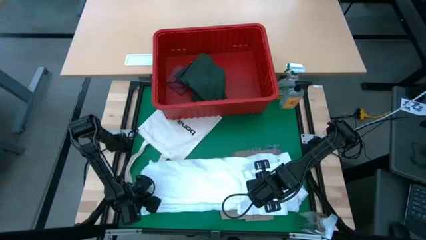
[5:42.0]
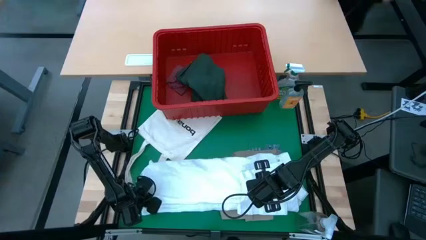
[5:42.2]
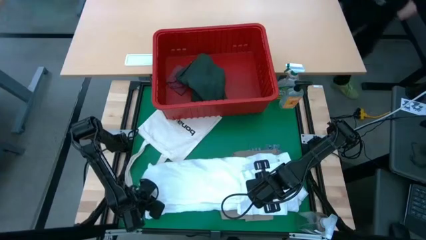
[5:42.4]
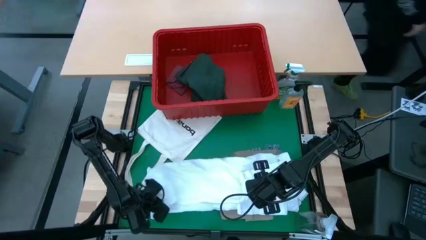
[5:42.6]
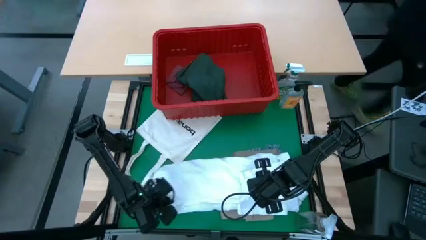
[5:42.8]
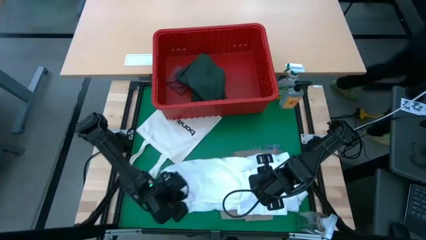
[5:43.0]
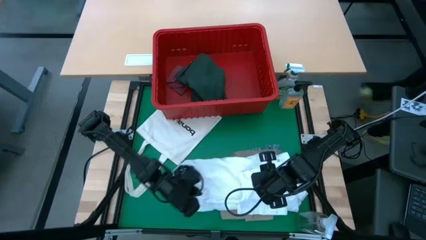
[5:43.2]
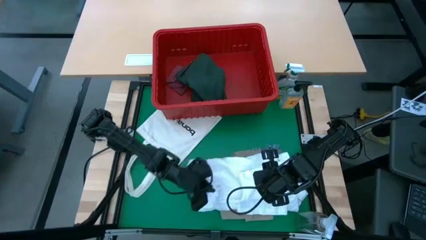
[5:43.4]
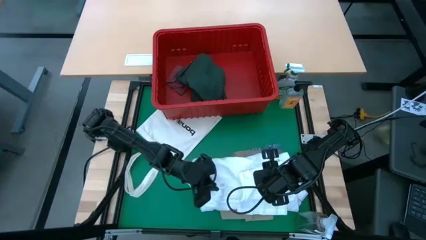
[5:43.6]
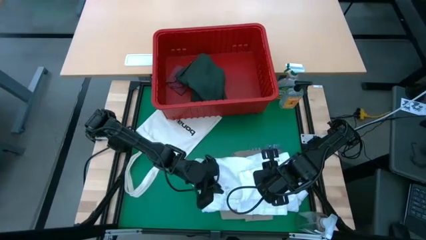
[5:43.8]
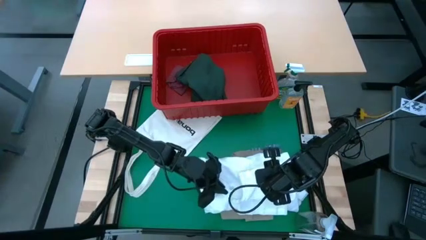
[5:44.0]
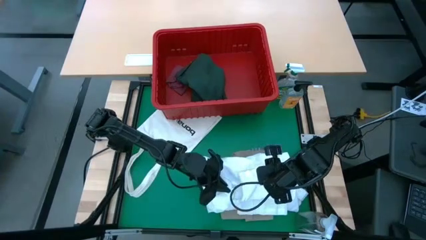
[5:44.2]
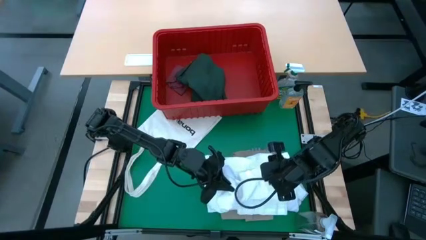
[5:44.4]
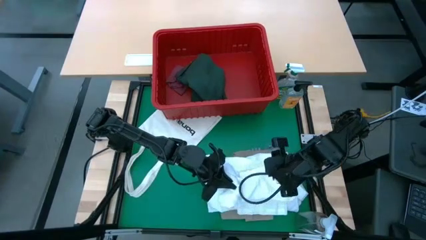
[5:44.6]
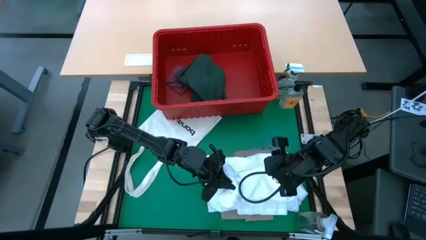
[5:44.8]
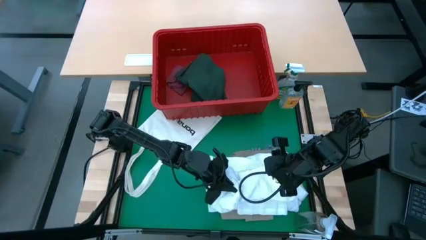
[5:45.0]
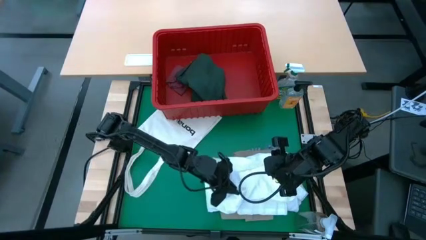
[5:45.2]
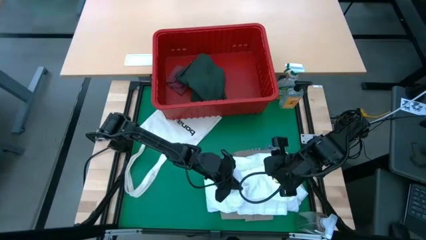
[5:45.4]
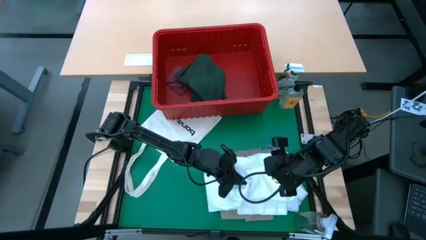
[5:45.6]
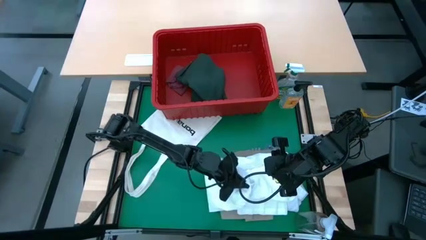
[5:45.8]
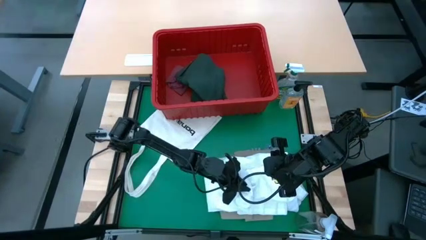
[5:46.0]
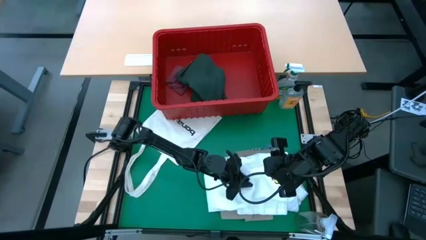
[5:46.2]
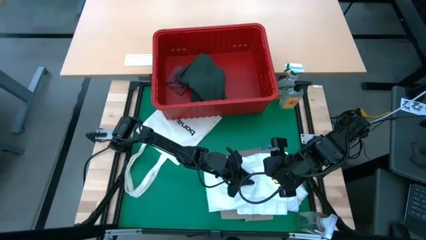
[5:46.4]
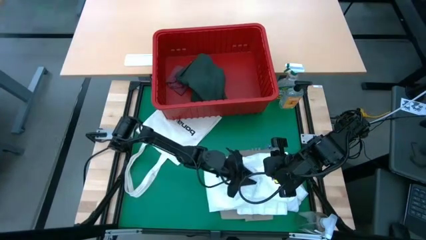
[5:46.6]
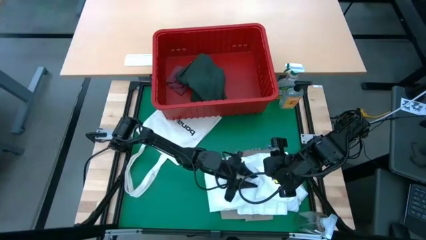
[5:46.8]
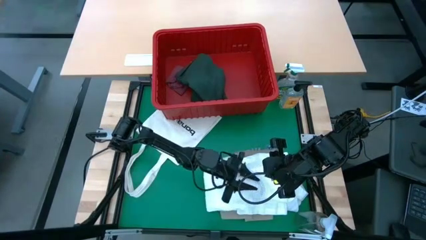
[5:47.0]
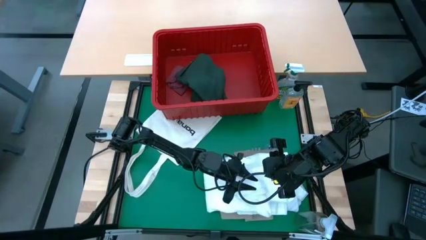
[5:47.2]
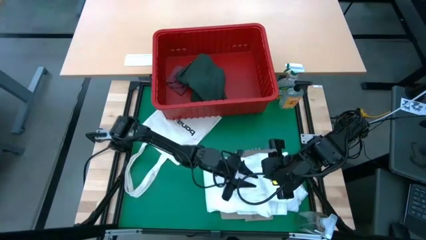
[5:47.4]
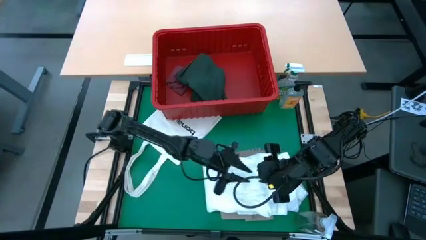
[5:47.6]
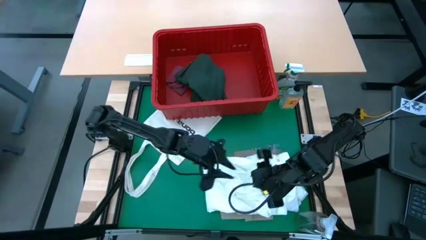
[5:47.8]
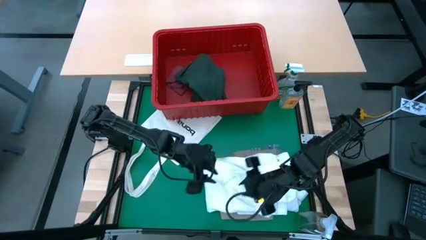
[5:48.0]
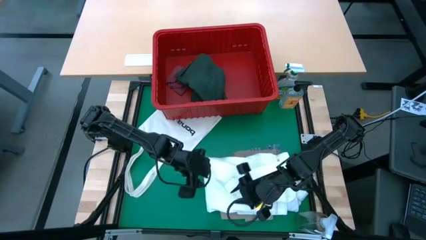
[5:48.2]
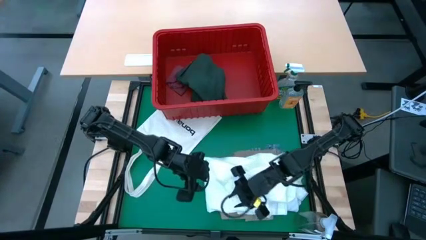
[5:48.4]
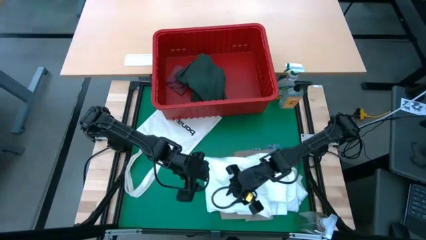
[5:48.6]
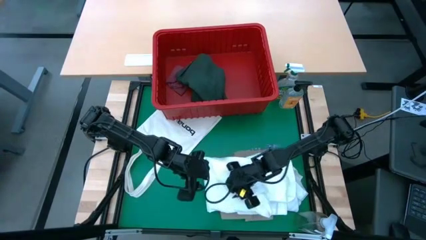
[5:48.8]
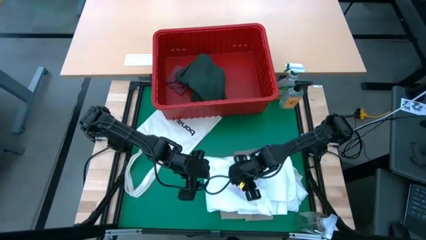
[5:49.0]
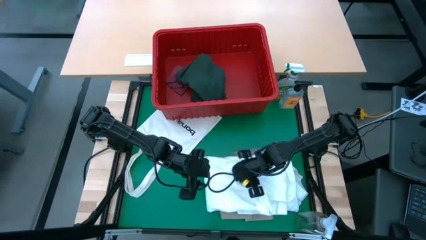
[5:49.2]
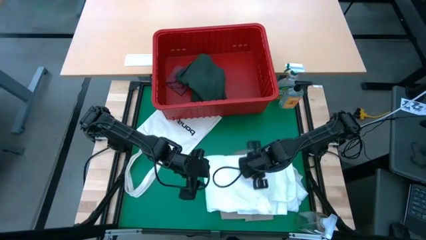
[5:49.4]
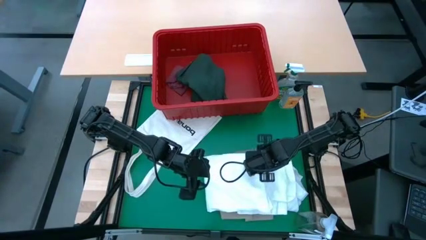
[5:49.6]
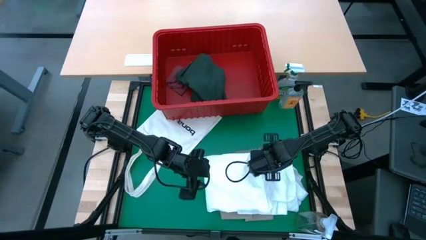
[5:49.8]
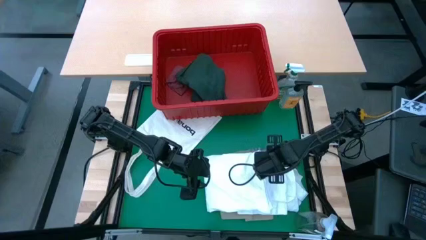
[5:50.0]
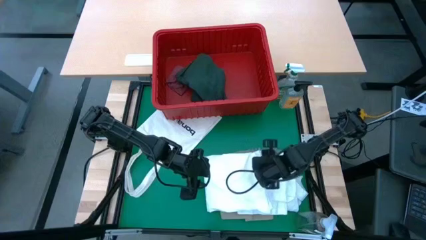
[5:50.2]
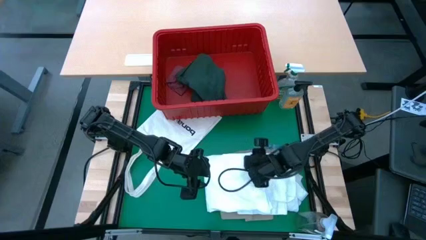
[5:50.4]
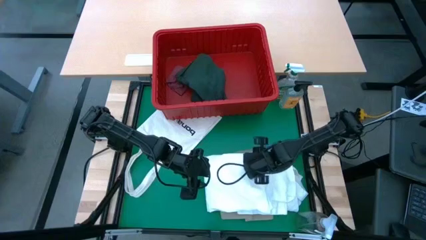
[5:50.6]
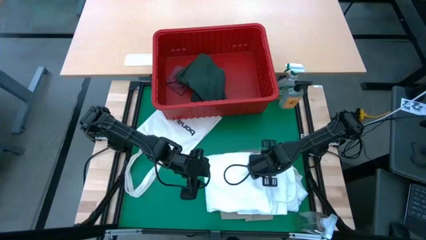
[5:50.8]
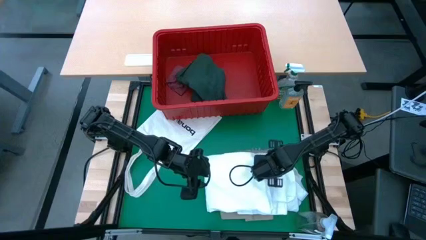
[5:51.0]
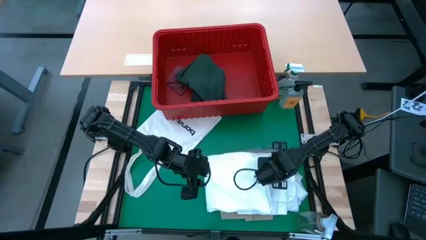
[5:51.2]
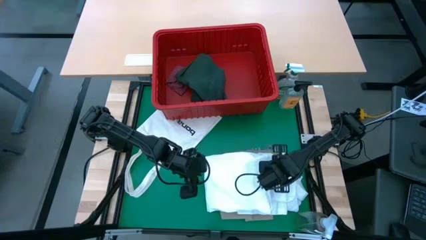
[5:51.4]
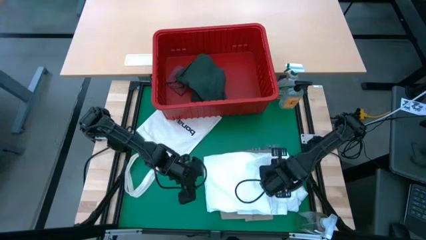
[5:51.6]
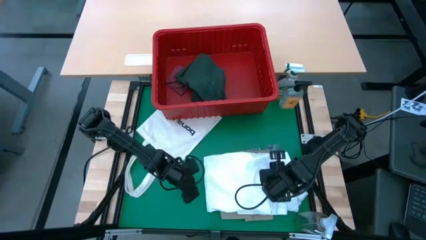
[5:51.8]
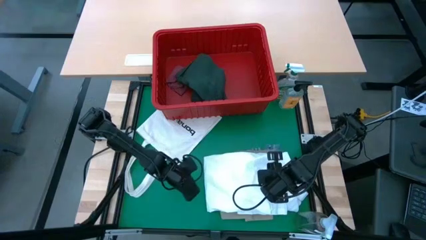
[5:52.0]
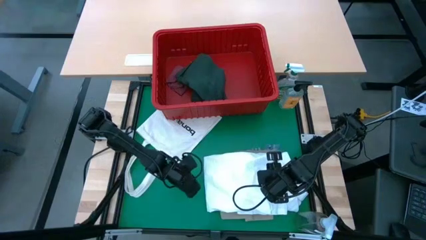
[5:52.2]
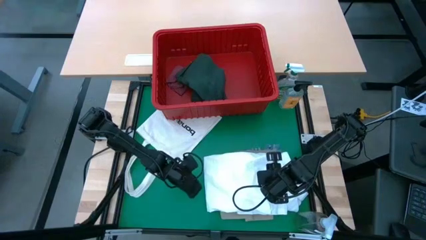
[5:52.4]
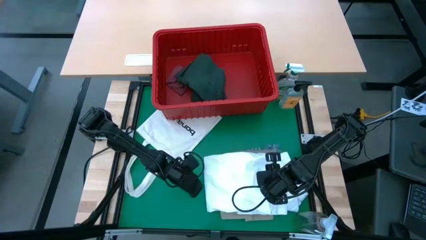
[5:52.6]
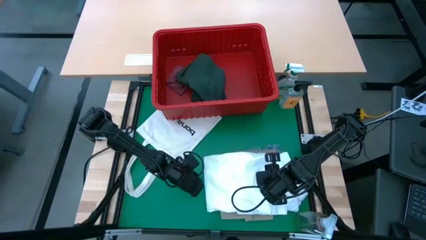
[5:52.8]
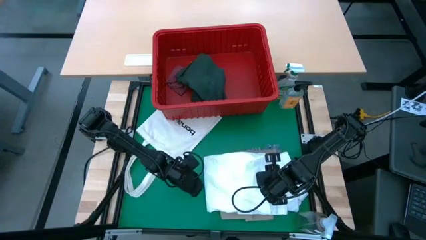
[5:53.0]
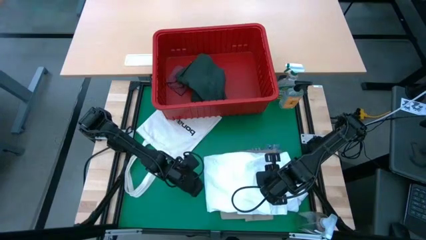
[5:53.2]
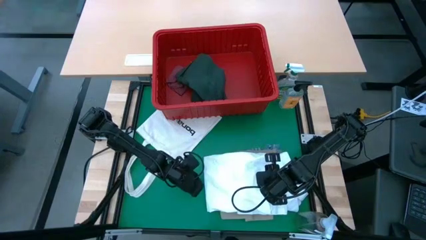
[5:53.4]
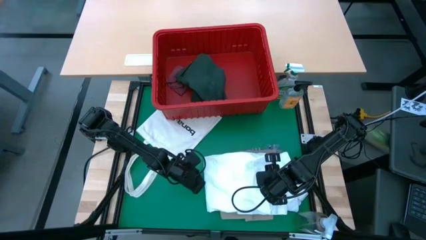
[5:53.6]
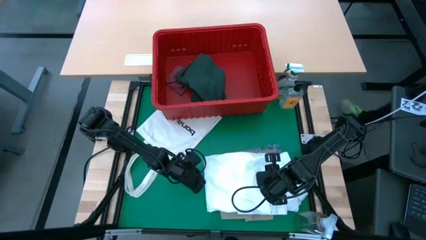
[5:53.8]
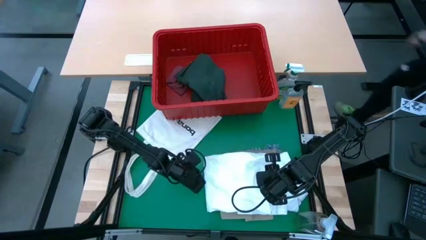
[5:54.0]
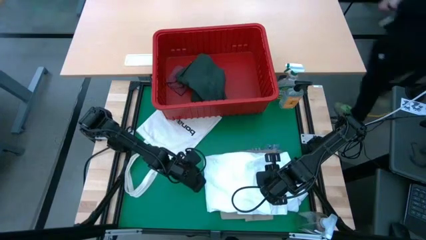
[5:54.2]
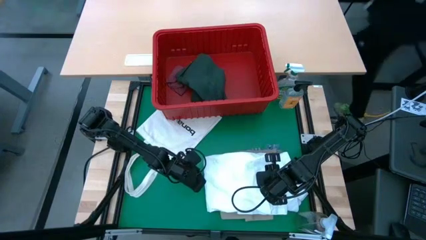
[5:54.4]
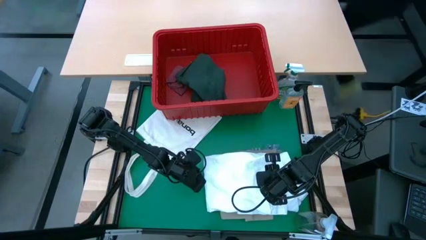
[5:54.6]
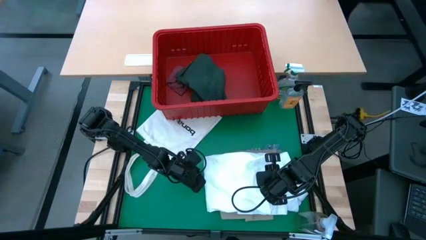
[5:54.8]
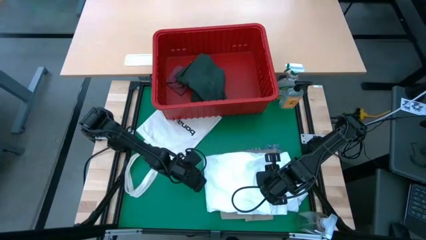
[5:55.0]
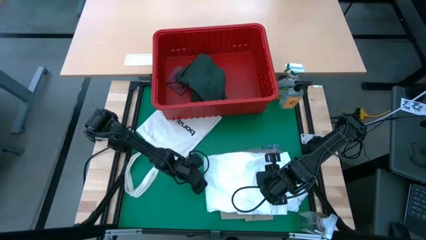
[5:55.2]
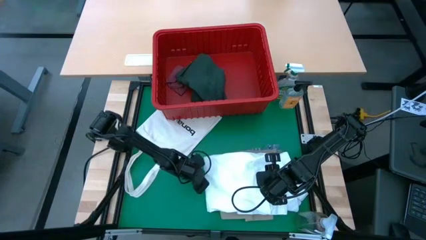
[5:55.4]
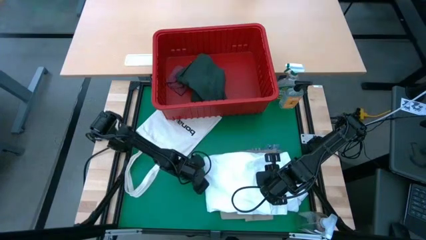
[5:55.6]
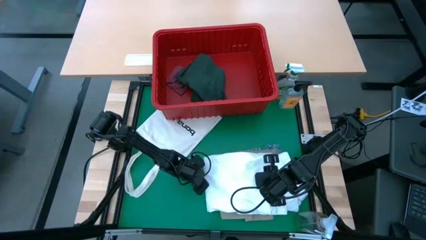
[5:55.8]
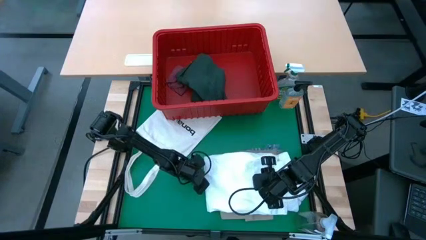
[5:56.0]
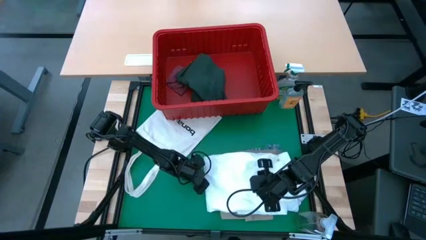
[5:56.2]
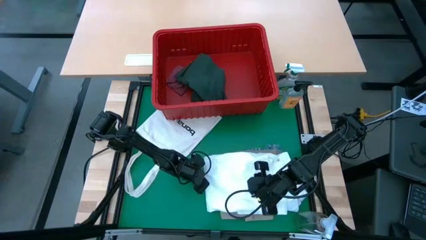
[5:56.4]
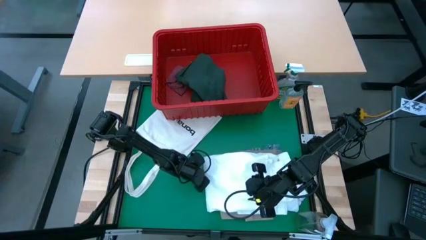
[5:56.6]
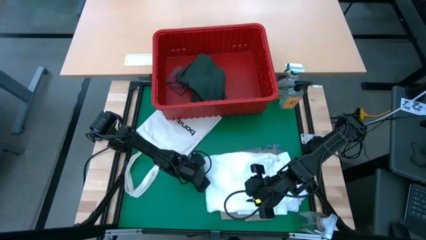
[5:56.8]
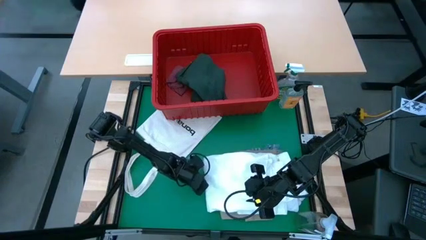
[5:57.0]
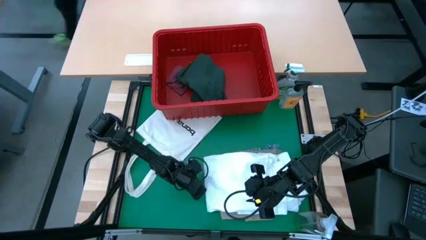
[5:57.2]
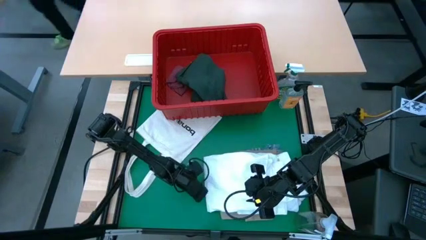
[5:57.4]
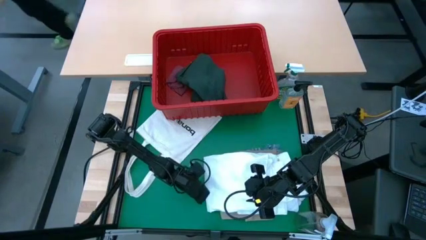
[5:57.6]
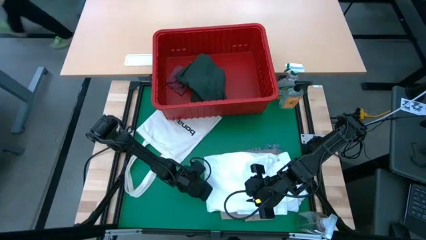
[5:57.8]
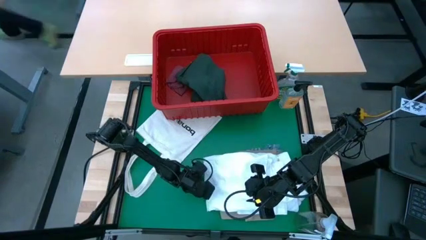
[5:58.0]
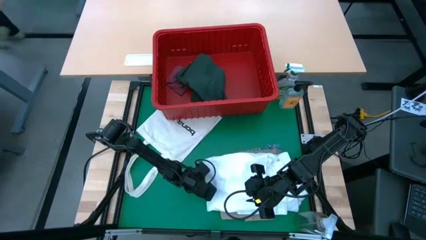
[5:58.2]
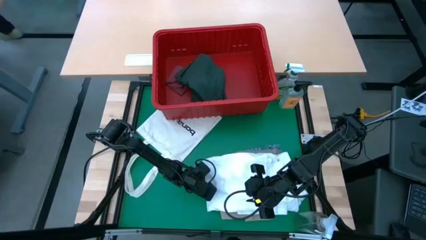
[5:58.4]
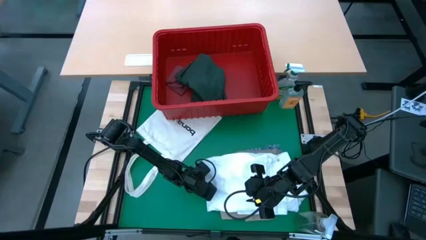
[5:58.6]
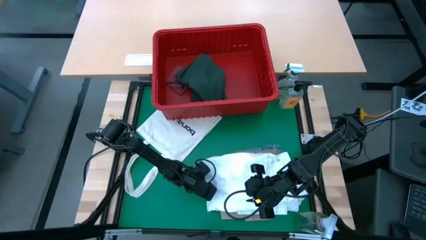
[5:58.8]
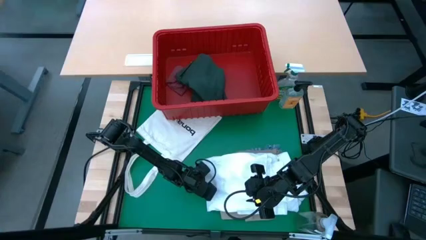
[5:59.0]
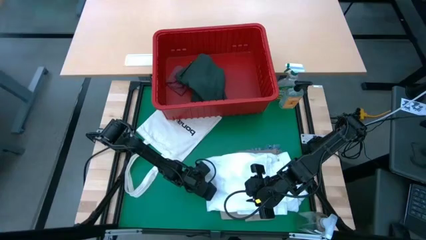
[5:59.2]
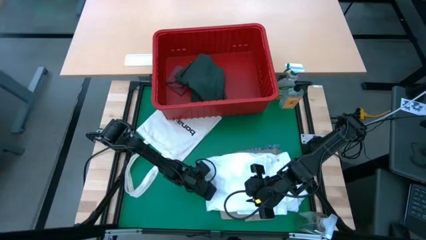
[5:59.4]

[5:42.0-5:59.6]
Task: Fold Laundry from Bin
Fold the white polo shirt
